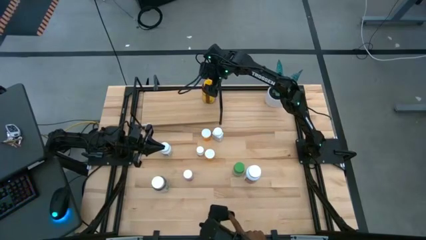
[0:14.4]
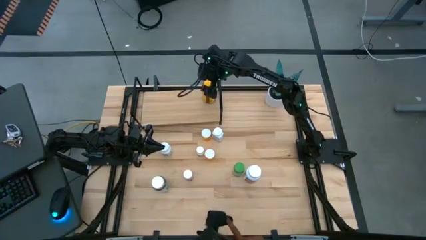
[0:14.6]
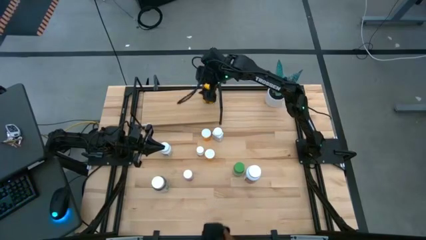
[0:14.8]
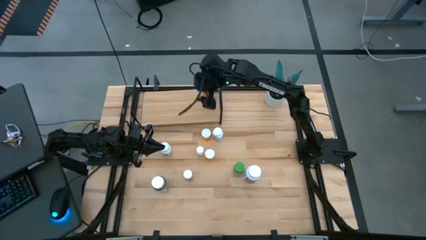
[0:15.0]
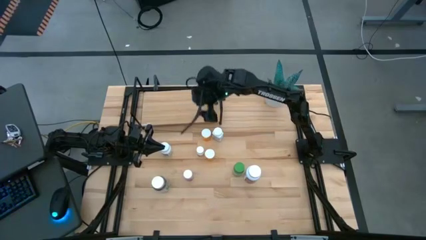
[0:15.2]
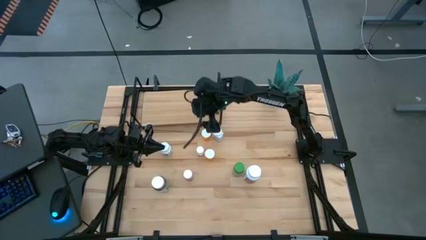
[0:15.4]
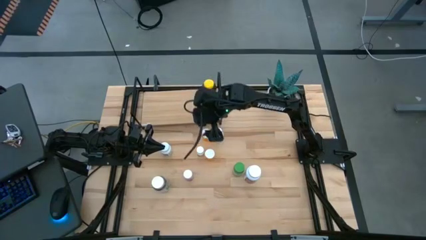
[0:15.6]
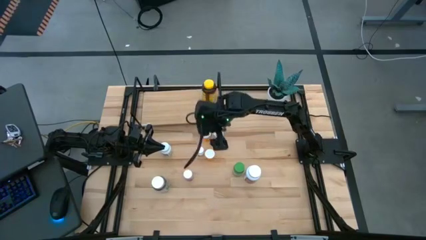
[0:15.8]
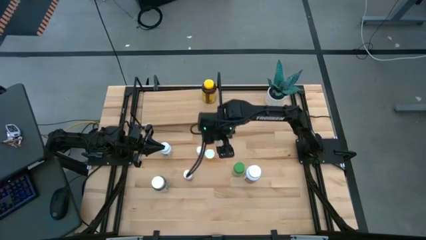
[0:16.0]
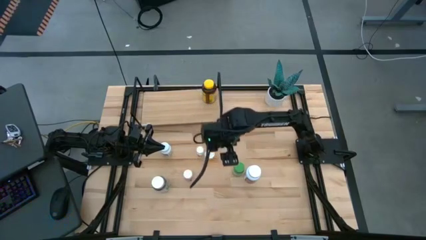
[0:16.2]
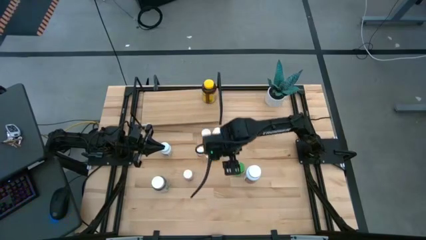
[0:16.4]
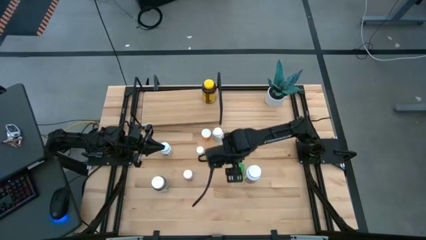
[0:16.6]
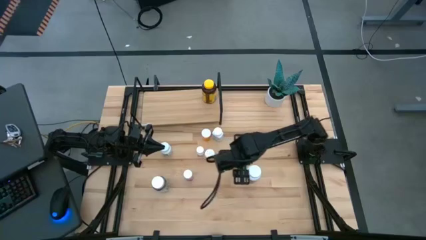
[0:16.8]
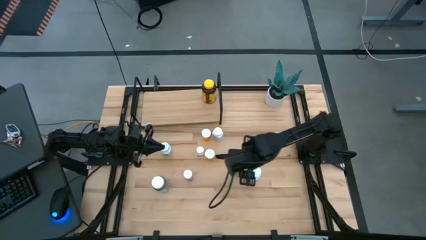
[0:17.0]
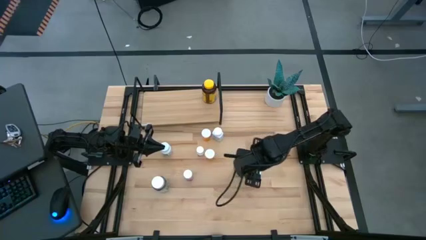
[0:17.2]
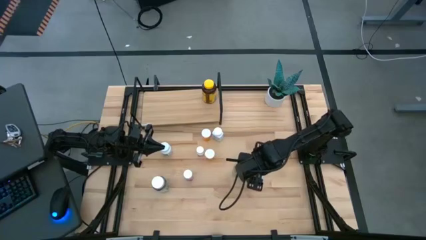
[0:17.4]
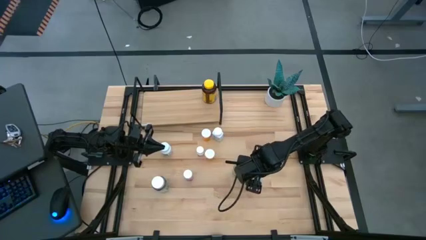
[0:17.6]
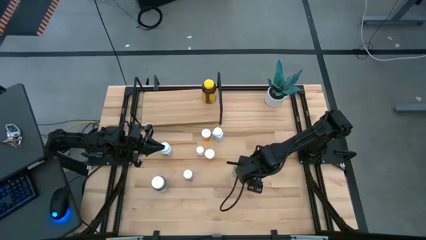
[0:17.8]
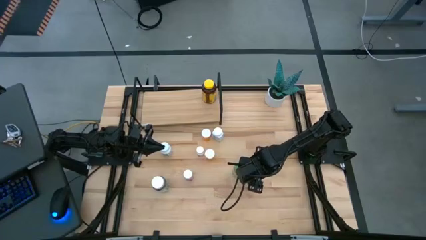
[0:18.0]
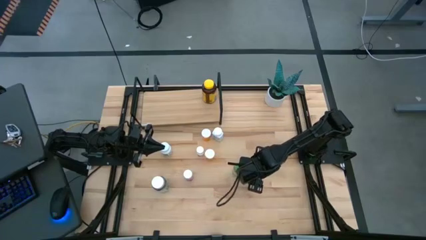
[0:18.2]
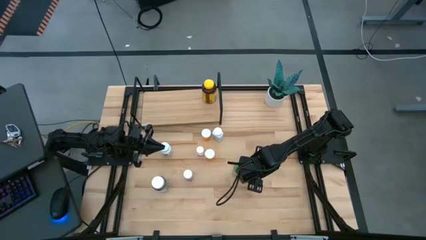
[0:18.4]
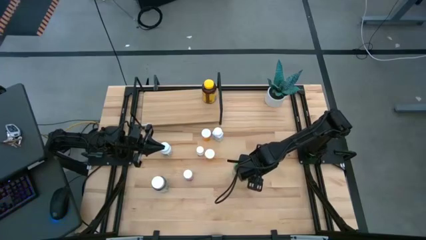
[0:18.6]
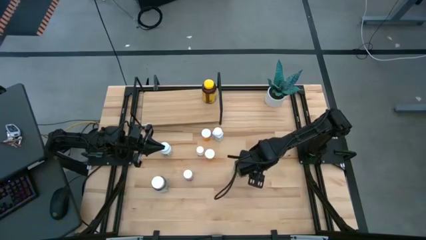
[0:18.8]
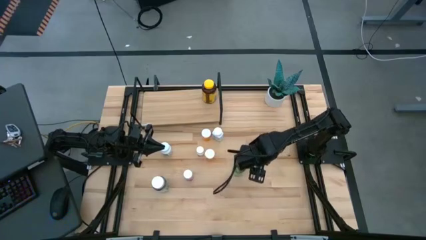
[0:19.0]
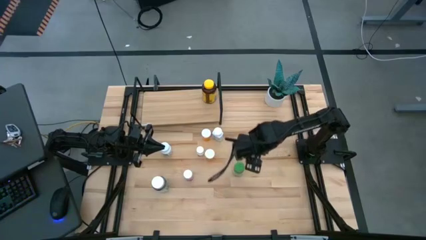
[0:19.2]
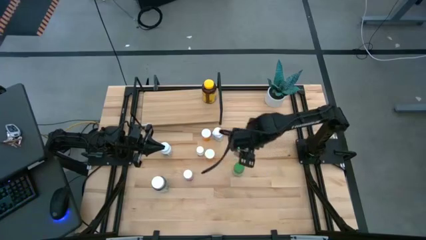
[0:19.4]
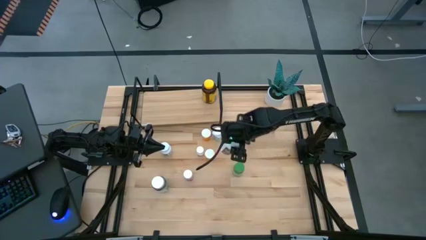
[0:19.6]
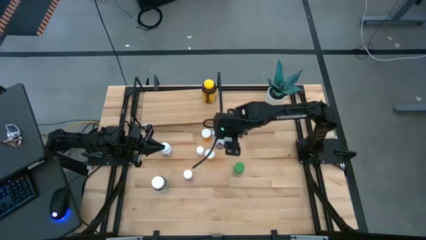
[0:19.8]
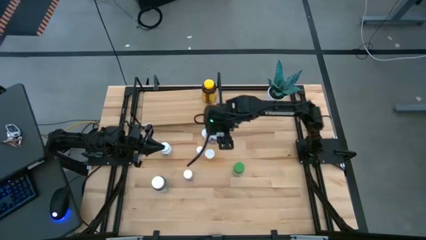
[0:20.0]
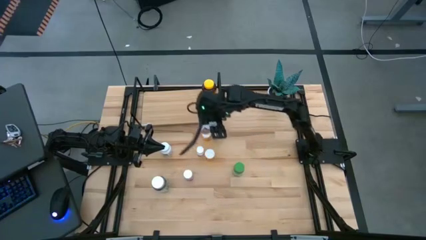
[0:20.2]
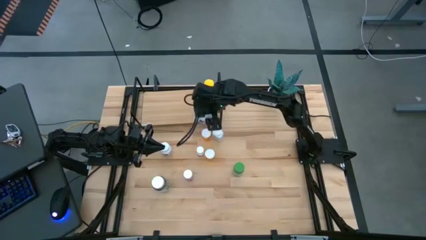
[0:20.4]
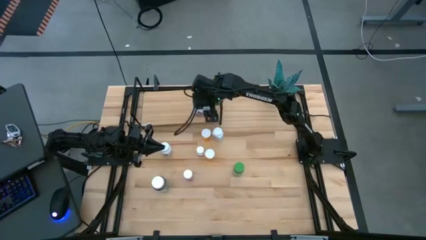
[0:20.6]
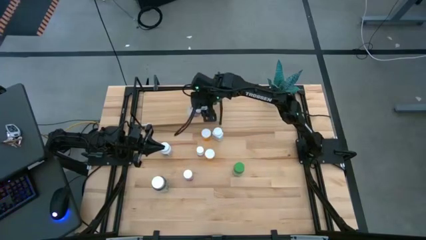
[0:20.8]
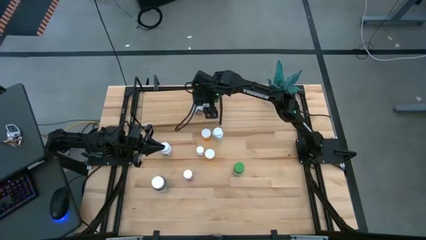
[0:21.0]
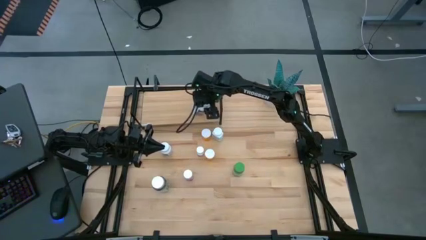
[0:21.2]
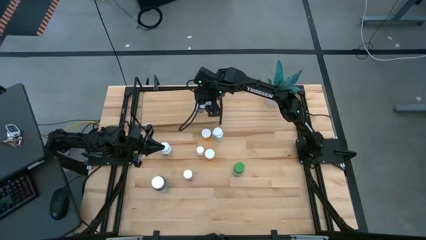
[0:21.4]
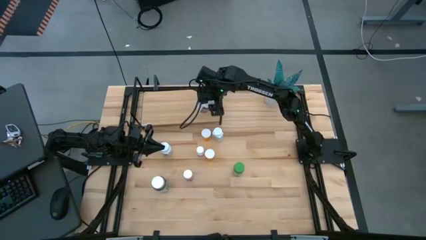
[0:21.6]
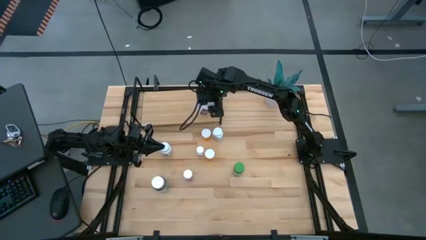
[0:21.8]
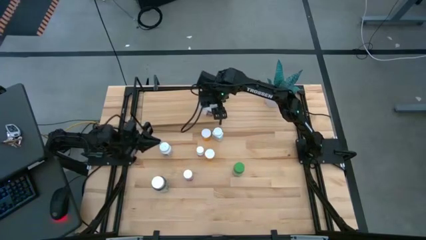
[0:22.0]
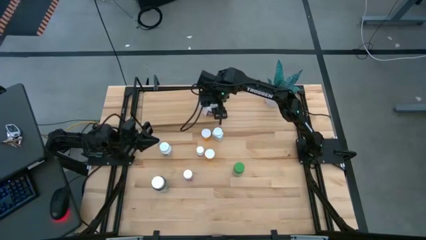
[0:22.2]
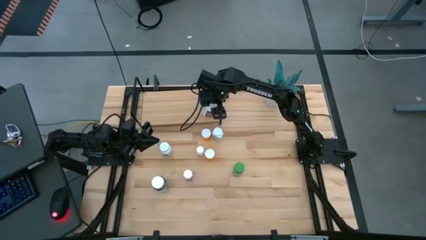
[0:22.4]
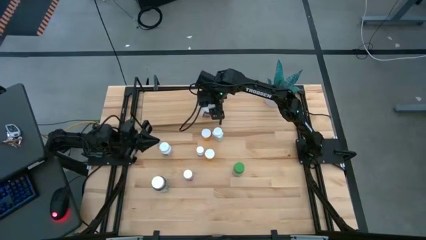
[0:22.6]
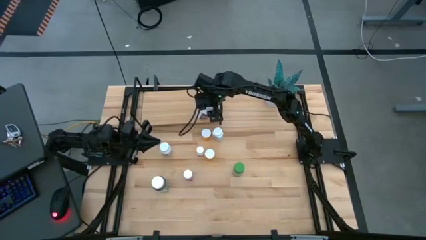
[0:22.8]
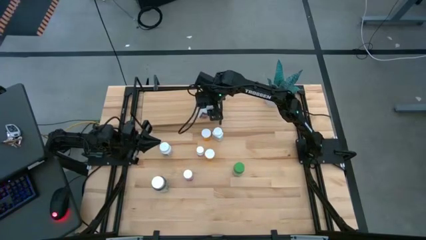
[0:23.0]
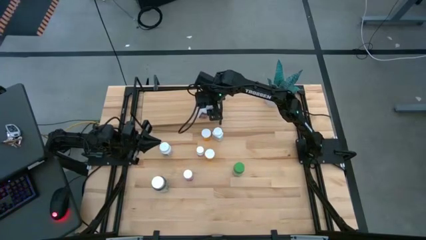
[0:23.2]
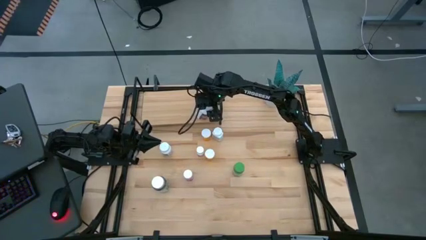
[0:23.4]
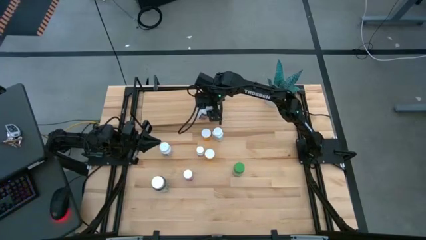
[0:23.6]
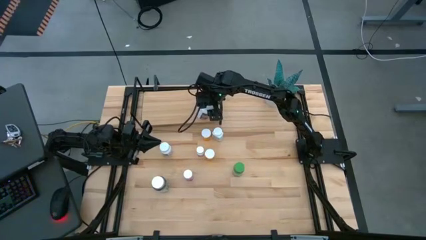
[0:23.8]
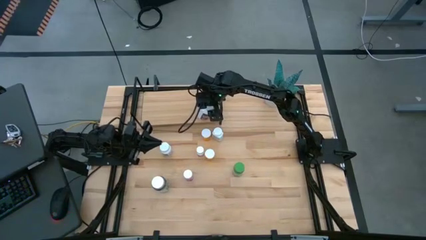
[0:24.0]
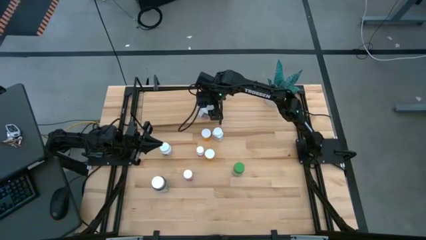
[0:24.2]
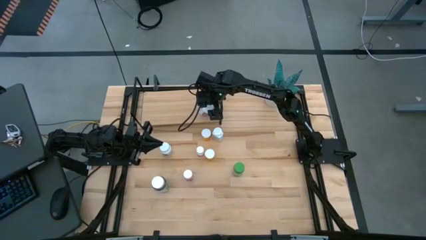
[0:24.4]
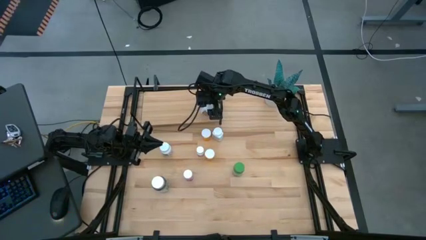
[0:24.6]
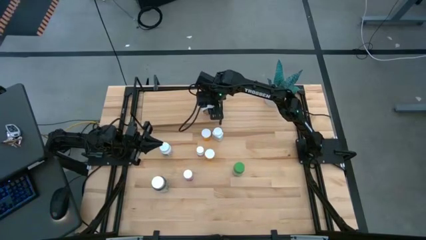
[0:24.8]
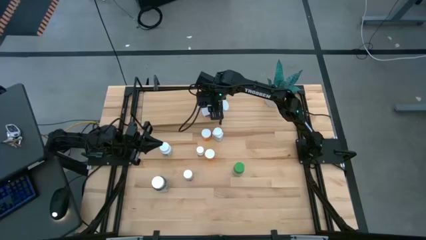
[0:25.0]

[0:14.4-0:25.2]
Task: Pick and place medicine bottles onto shelf by color
Put the white and purple pill bottle on the shelf

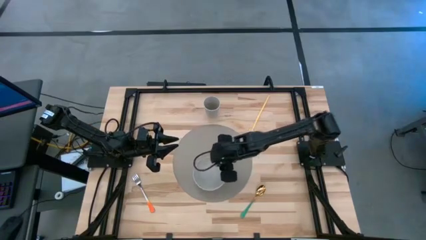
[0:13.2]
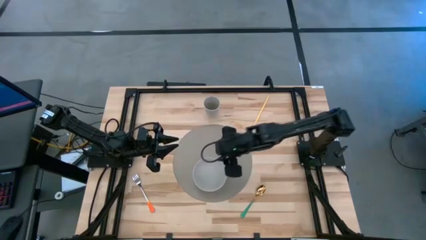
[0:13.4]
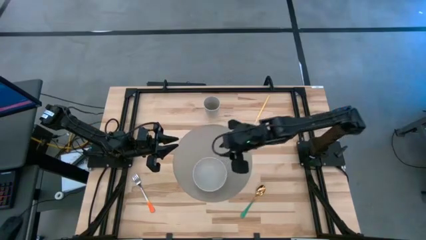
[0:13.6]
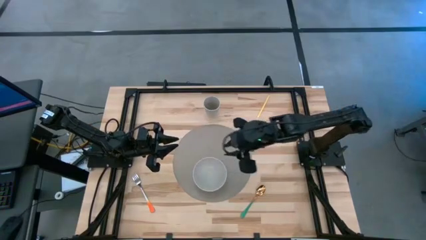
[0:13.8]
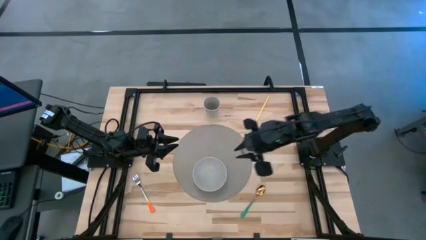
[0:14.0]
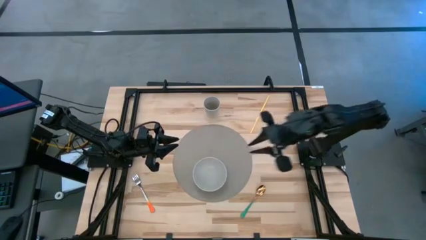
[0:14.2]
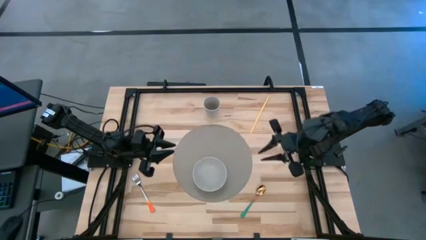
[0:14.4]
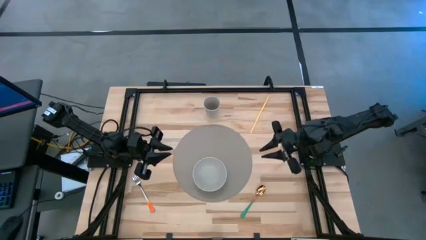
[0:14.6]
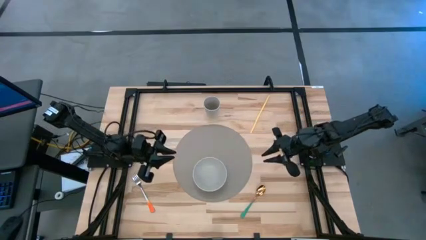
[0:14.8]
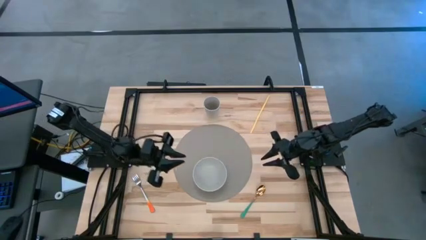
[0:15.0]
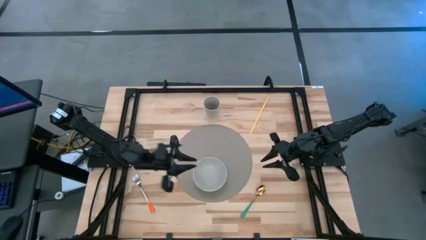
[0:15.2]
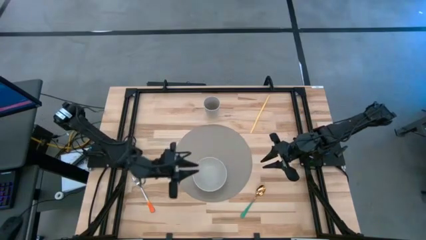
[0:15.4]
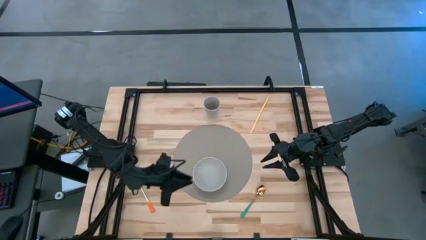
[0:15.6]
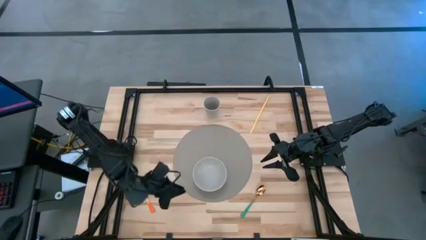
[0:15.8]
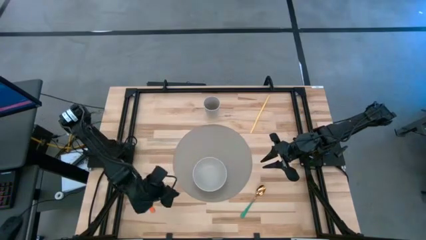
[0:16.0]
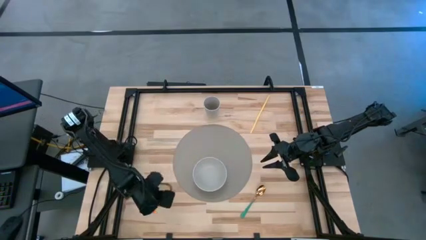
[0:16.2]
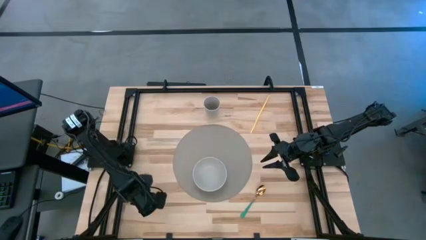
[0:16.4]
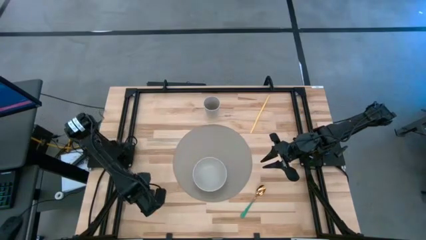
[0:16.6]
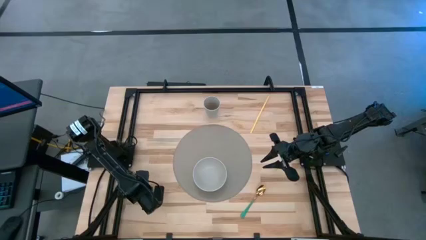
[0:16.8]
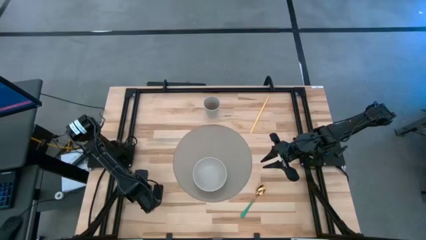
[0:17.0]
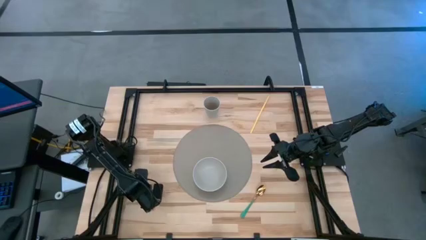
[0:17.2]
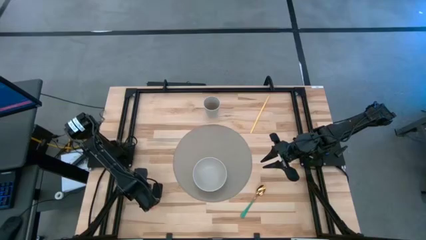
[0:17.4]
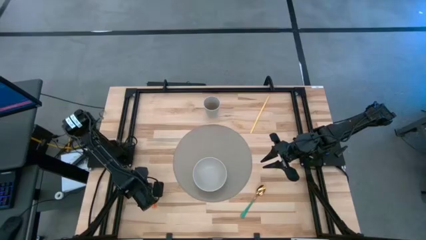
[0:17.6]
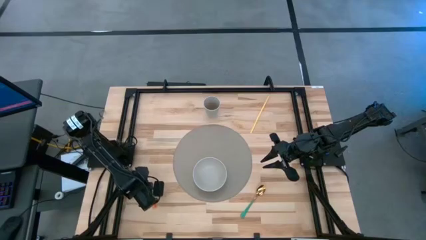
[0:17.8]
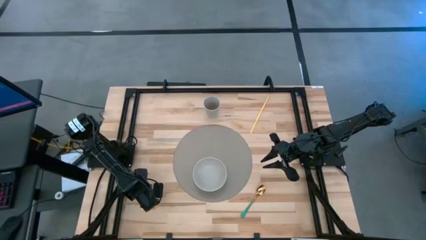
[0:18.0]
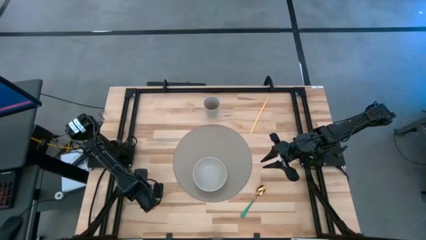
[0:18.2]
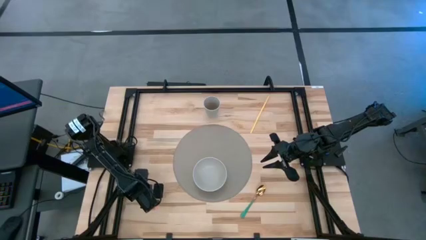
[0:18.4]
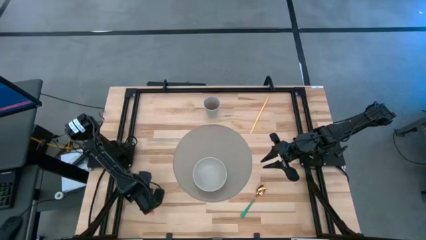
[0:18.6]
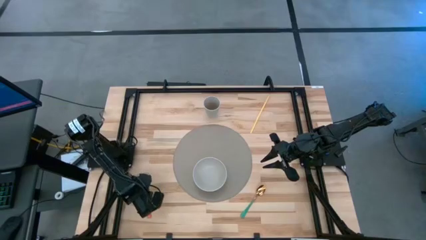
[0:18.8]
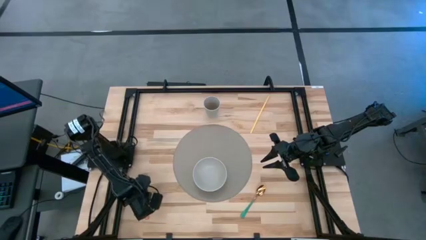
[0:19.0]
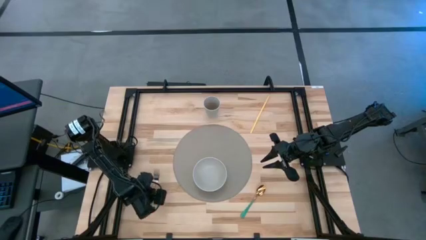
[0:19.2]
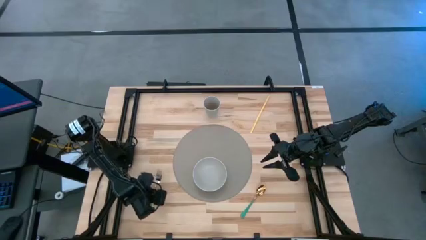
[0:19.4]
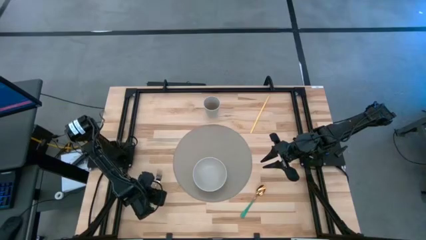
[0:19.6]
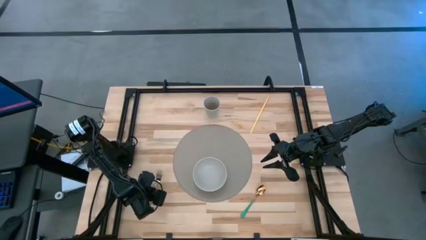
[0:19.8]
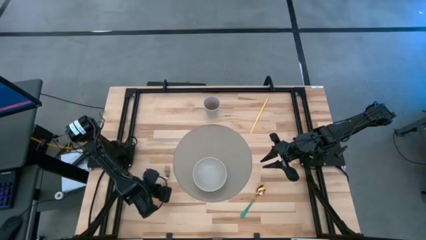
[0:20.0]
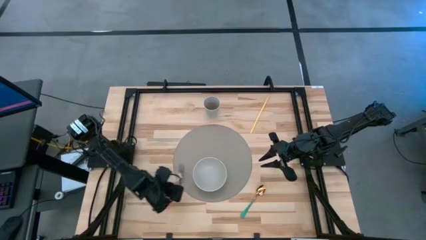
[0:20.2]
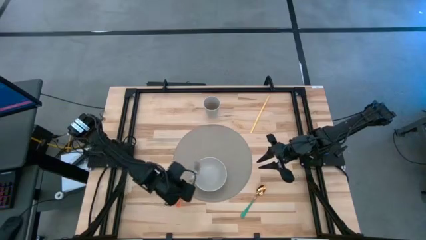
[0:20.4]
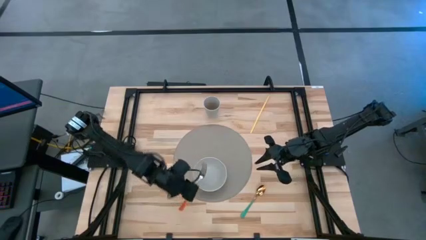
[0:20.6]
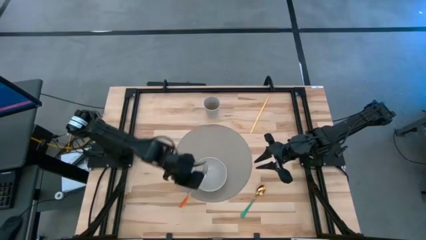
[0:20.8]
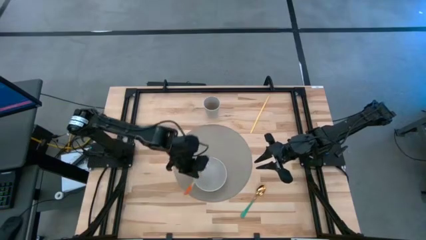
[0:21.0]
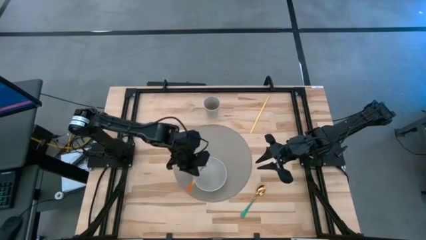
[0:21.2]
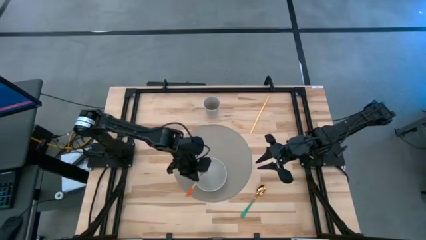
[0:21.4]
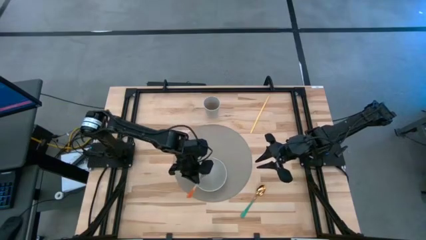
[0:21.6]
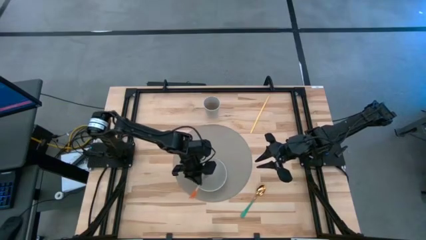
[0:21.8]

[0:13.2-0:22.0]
Task: Pick & Place Utensil
Put the orange fork in the white bowl on the gray placemat
